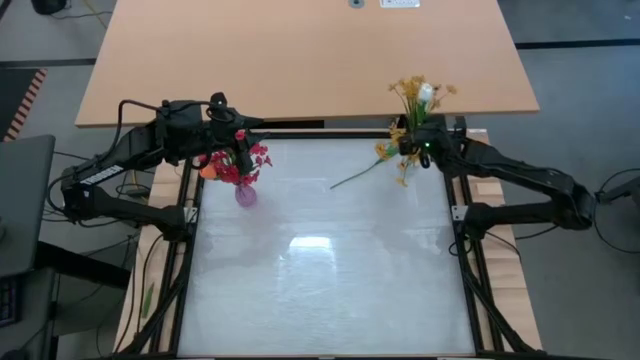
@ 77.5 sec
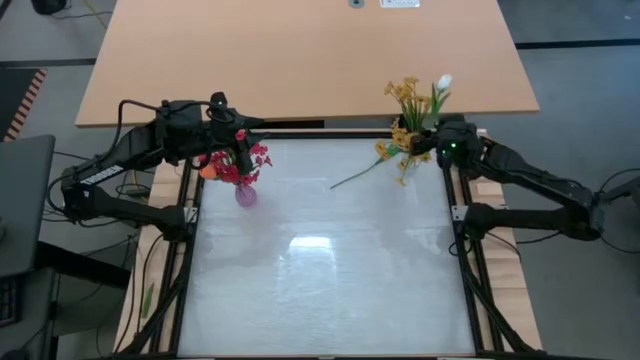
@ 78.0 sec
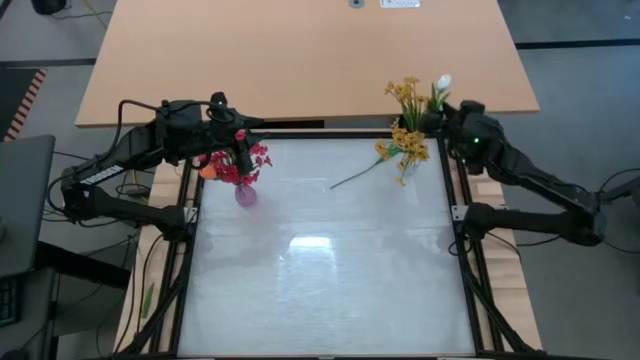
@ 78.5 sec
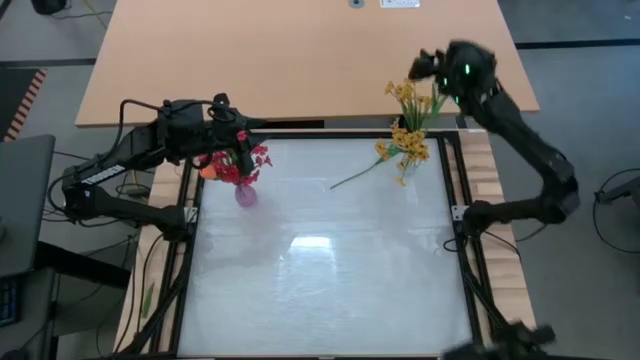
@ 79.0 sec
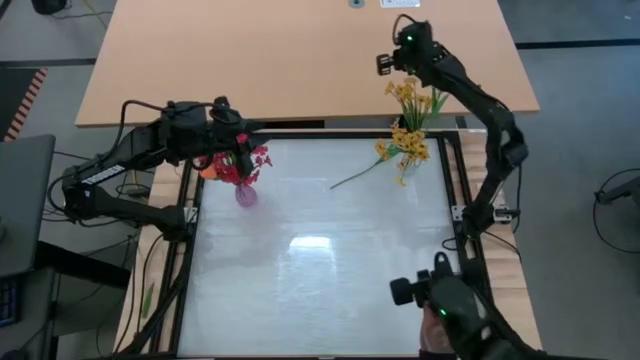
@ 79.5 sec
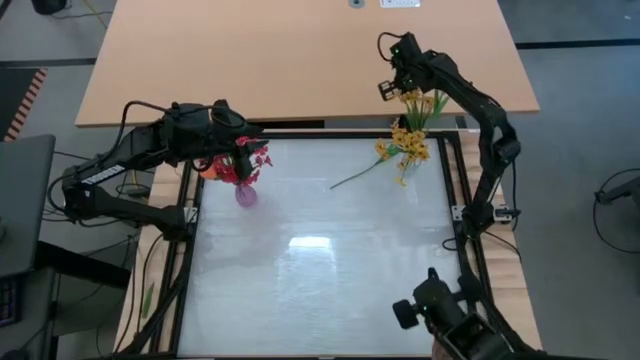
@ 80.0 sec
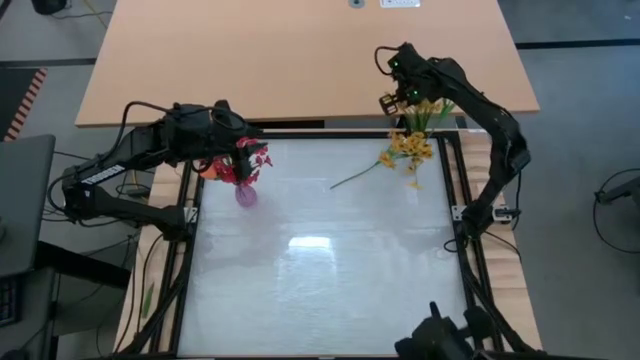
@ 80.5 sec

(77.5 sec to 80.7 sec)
Task: Sort flowers into vase by color
Adjust the yellow flowers

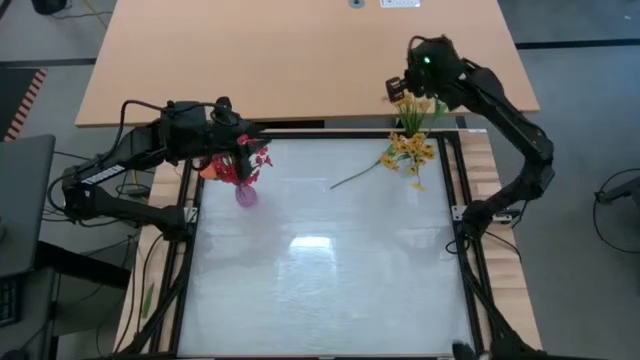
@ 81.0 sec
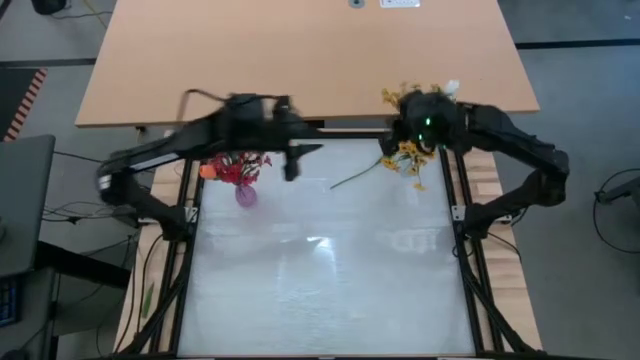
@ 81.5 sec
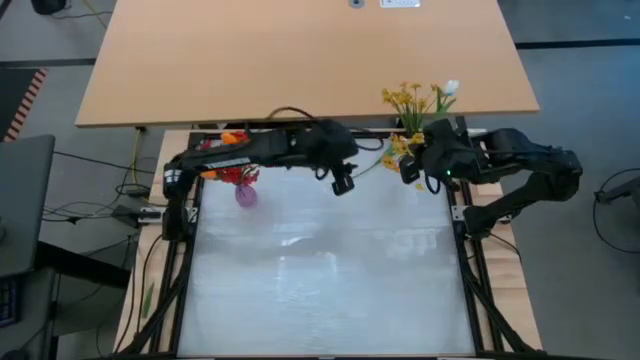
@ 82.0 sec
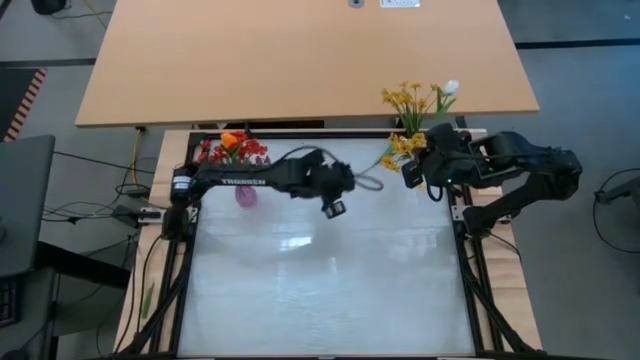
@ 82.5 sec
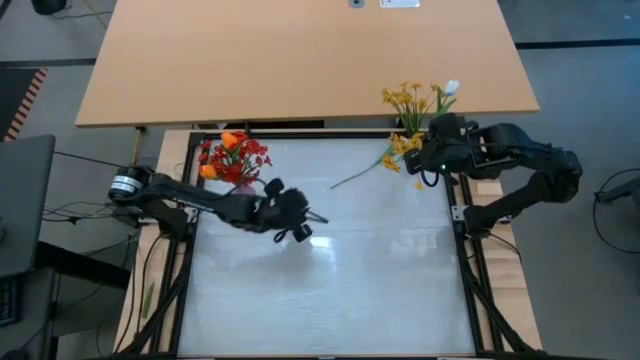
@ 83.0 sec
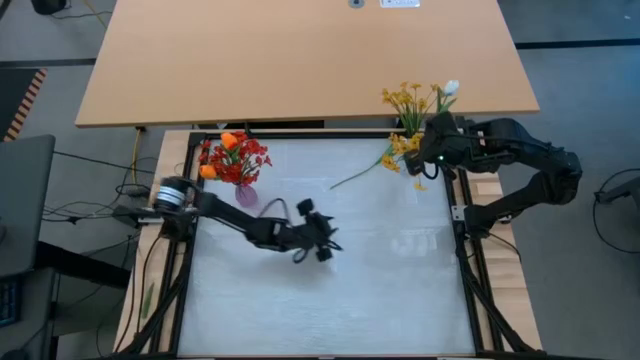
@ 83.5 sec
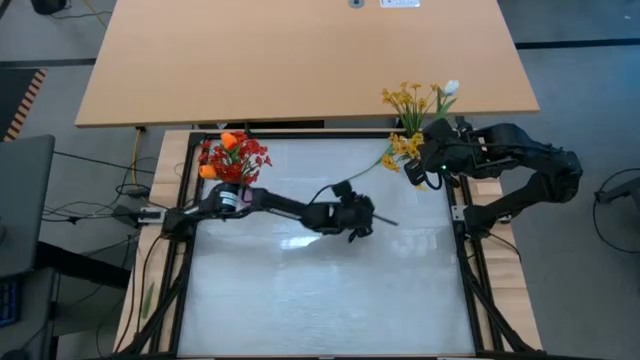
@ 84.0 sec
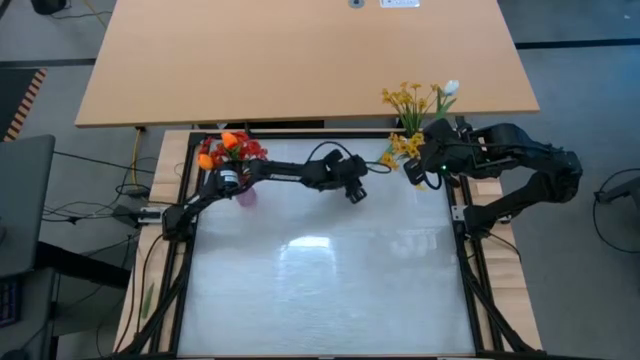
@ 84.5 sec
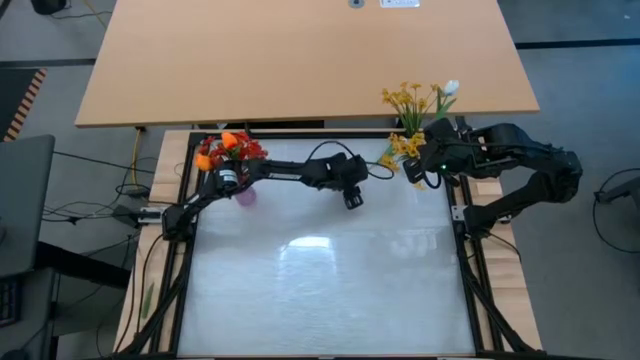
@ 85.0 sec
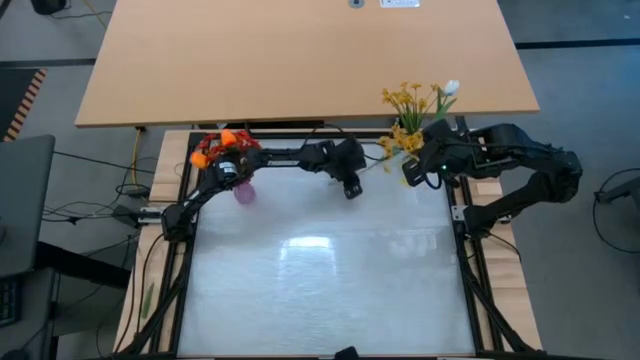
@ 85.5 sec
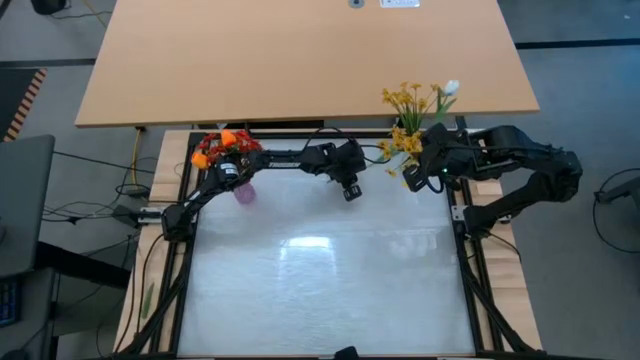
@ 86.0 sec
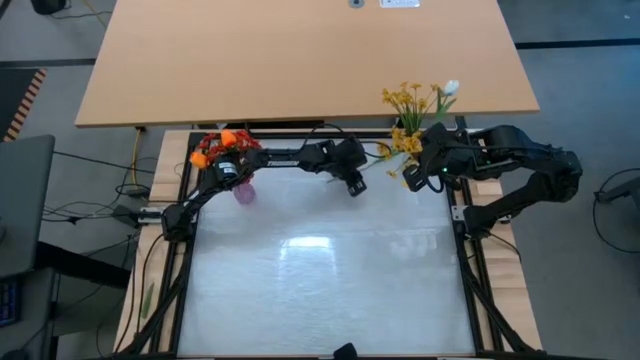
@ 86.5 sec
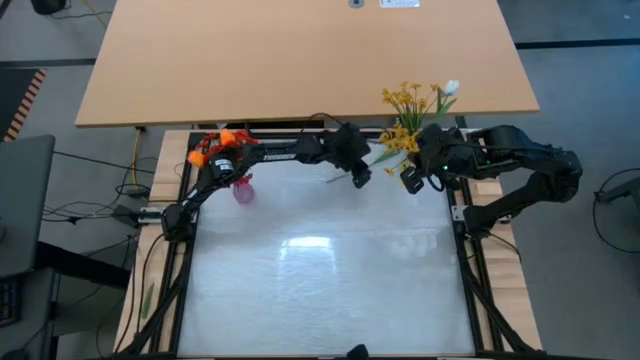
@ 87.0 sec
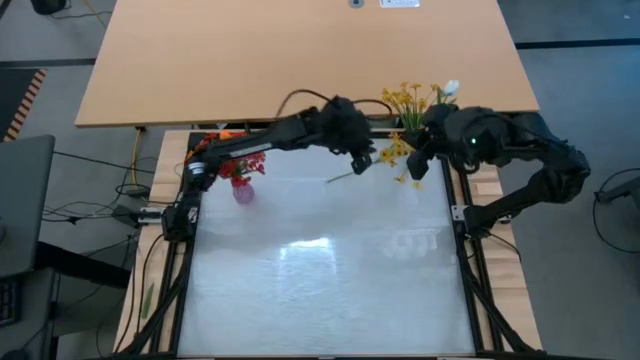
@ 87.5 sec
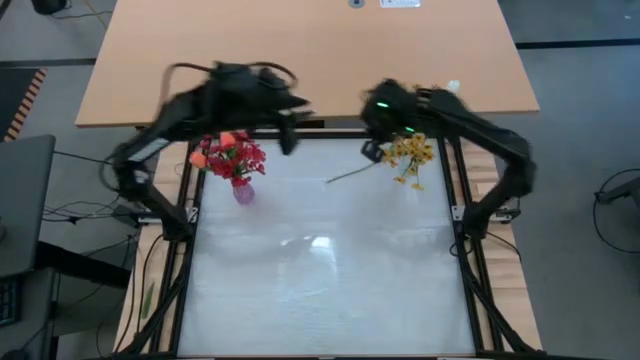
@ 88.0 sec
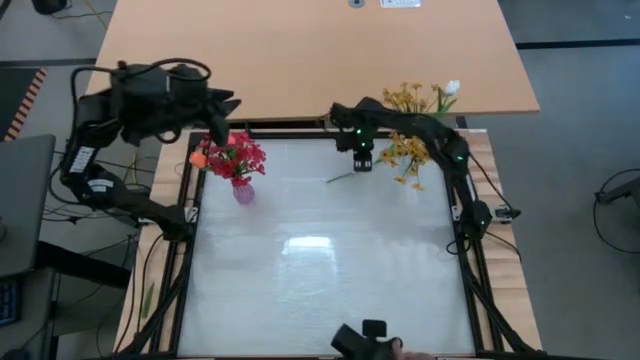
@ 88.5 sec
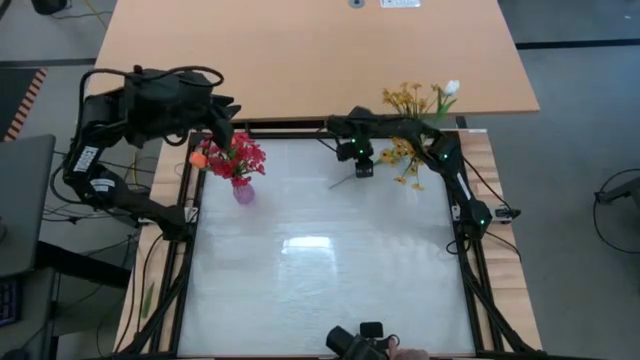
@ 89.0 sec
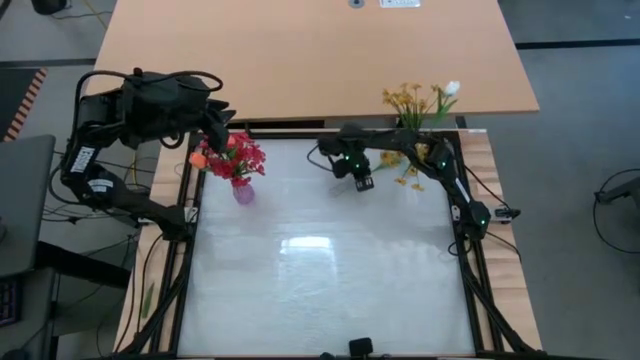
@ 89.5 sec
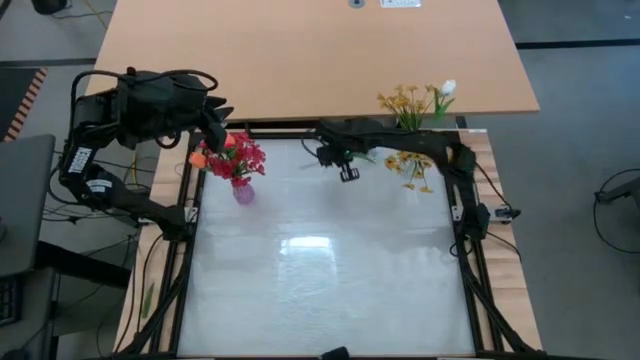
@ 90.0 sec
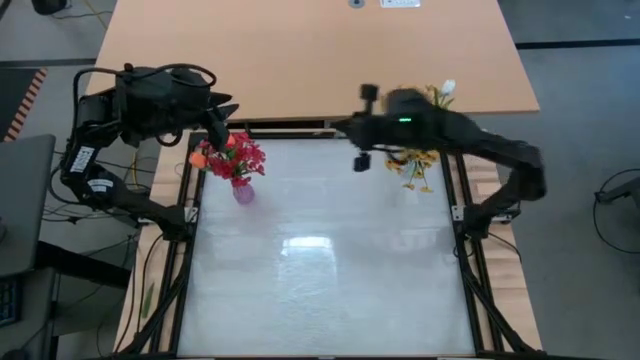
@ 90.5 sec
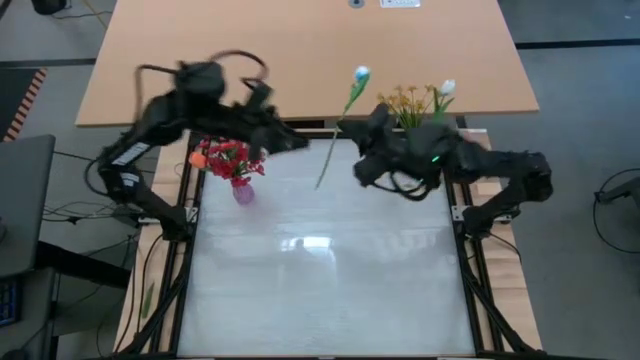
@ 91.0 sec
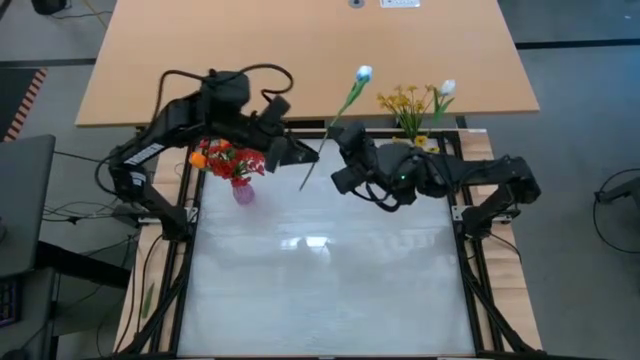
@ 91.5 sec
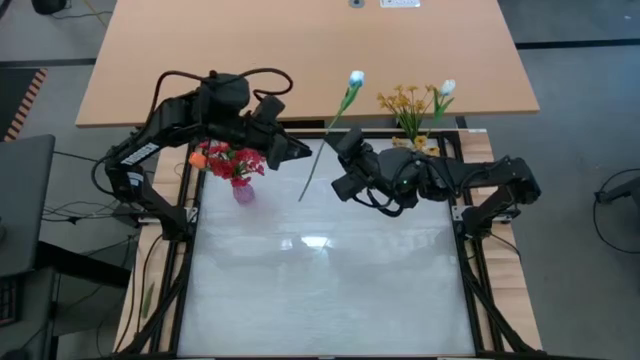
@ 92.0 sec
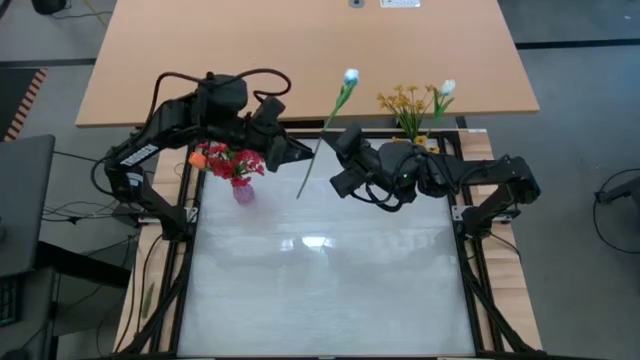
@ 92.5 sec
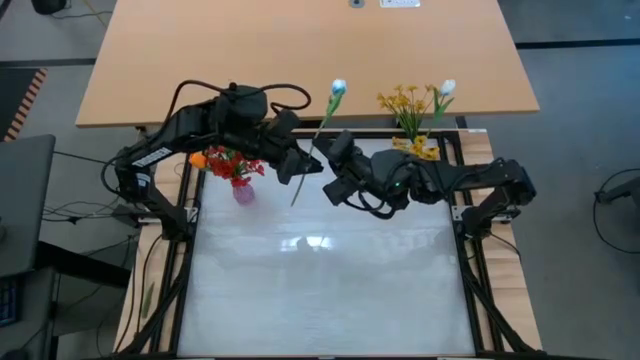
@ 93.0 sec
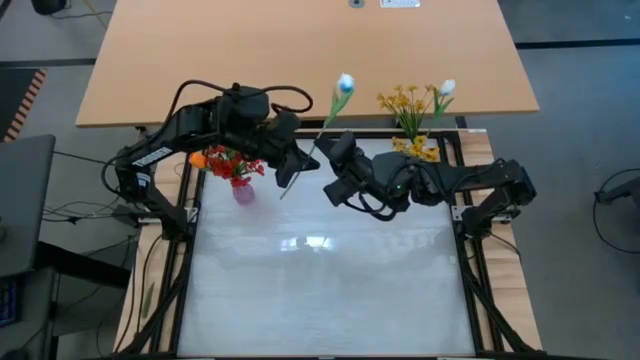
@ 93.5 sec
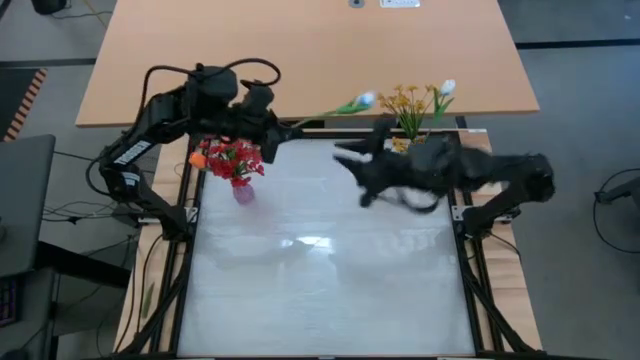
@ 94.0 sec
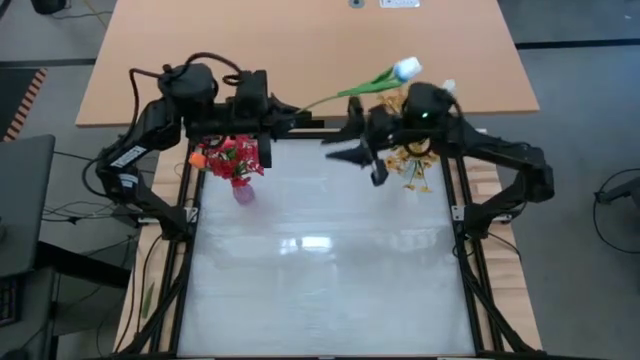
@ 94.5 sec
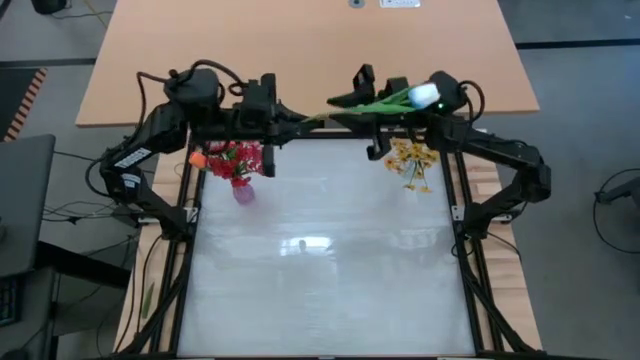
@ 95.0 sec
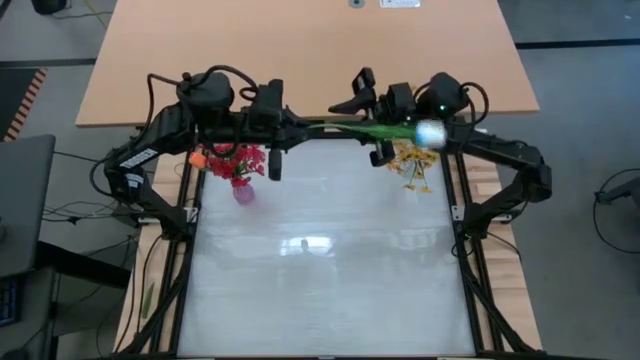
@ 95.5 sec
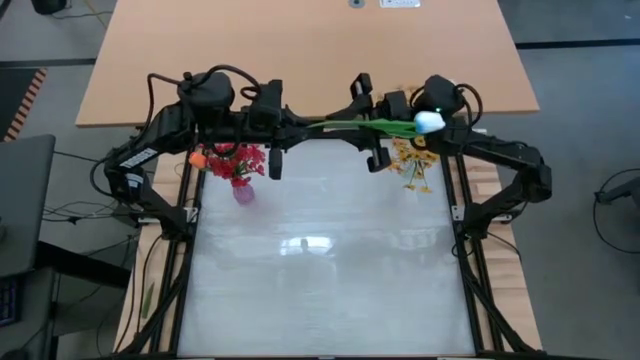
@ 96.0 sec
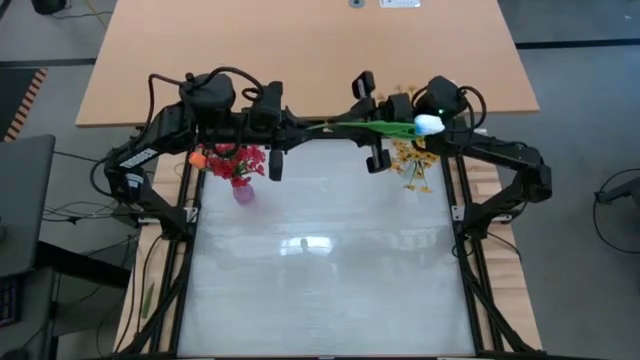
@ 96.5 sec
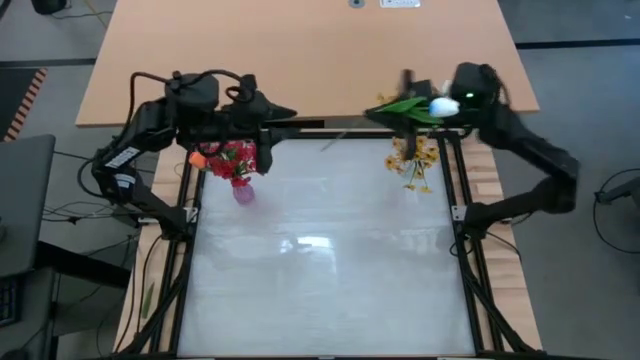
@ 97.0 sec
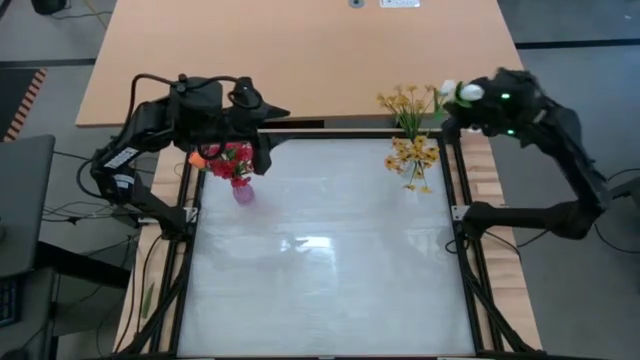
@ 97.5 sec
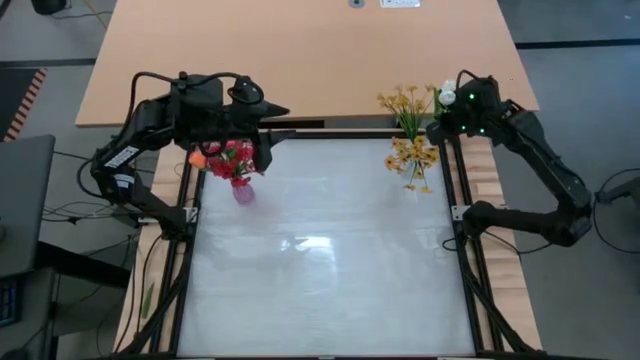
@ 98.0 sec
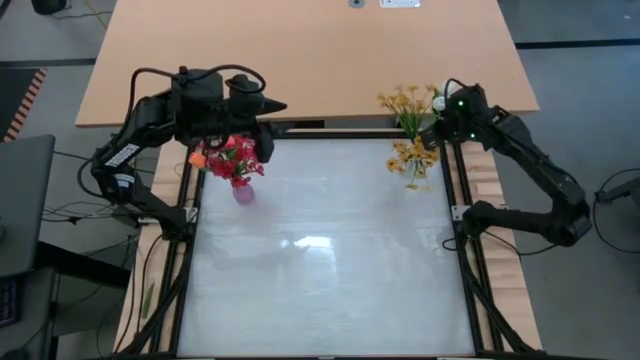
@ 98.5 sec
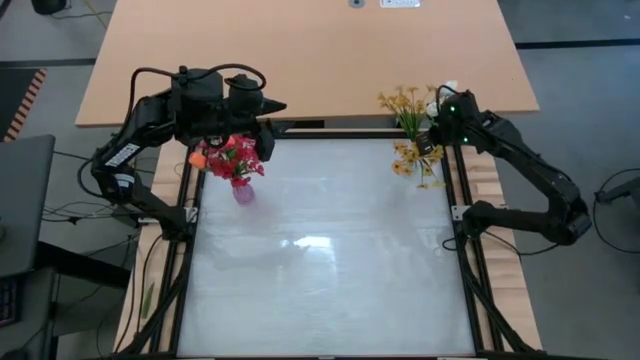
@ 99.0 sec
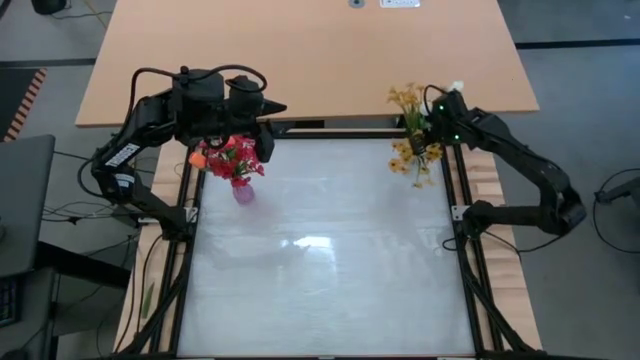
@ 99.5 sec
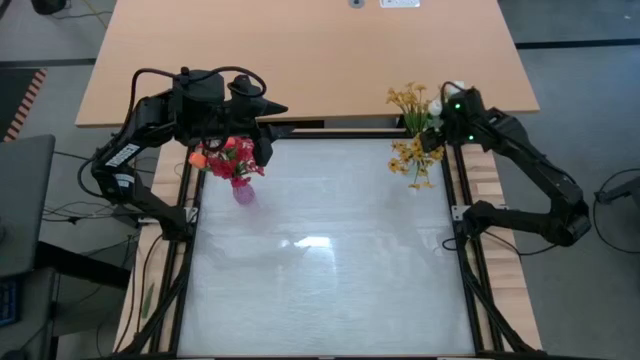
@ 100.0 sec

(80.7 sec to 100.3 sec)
Put the white tulip into the transparent vase
